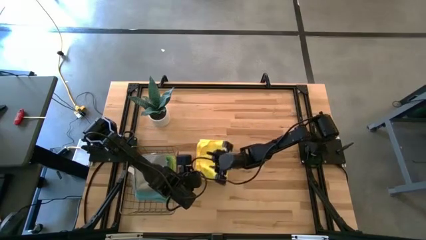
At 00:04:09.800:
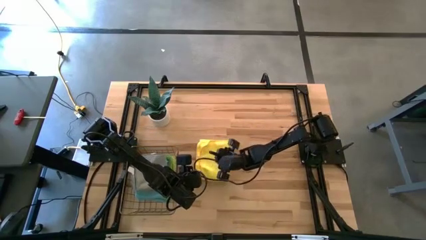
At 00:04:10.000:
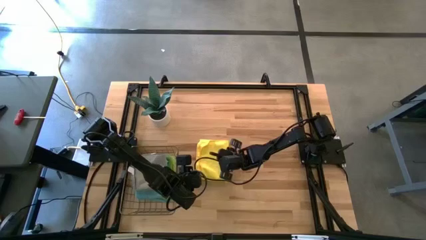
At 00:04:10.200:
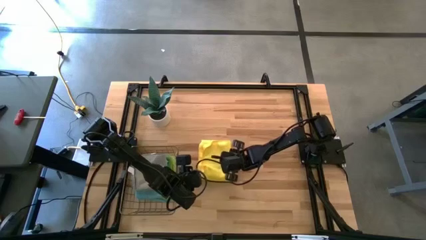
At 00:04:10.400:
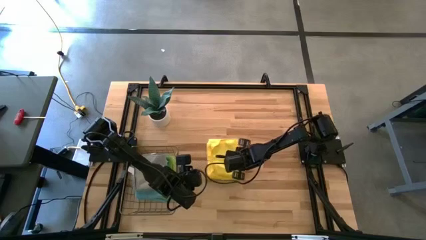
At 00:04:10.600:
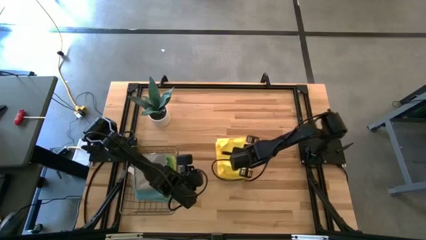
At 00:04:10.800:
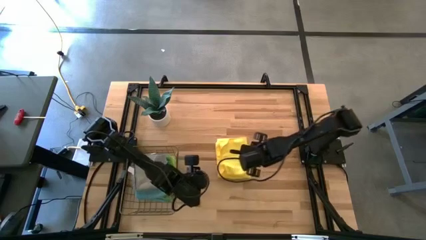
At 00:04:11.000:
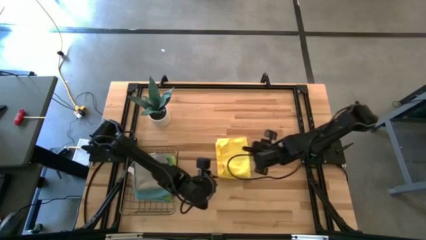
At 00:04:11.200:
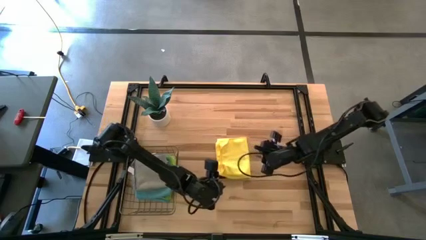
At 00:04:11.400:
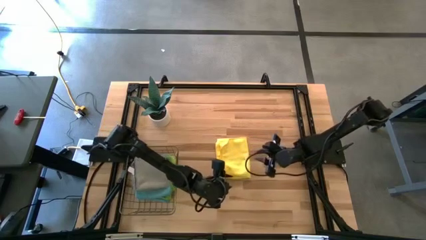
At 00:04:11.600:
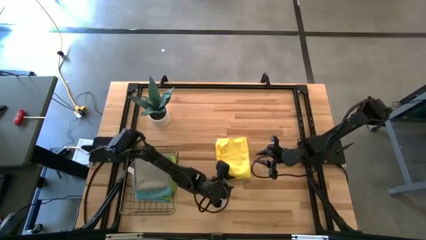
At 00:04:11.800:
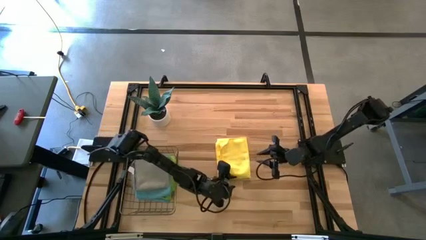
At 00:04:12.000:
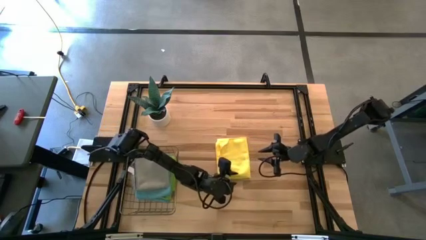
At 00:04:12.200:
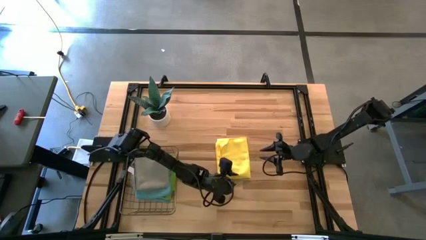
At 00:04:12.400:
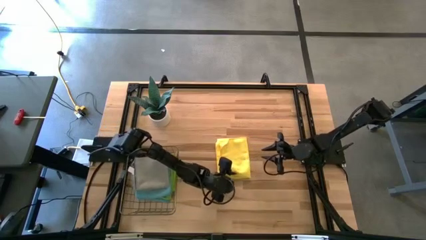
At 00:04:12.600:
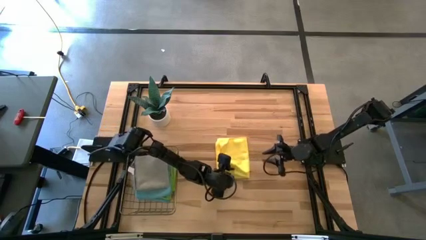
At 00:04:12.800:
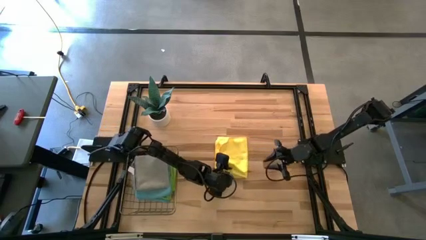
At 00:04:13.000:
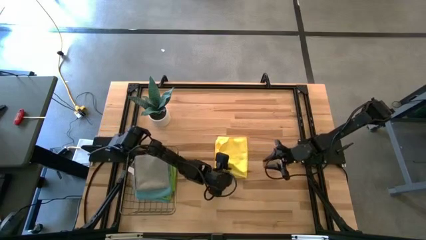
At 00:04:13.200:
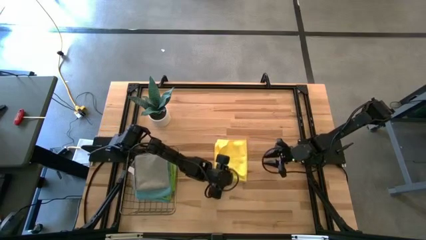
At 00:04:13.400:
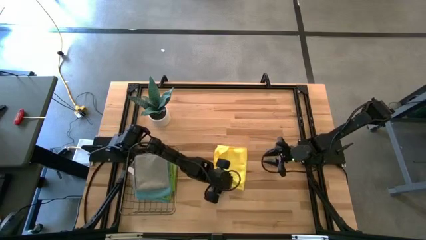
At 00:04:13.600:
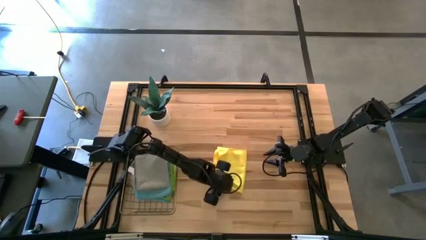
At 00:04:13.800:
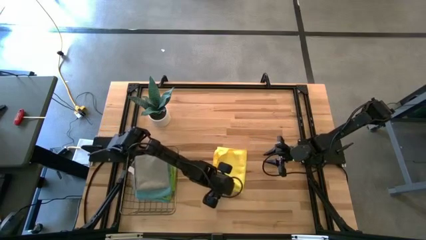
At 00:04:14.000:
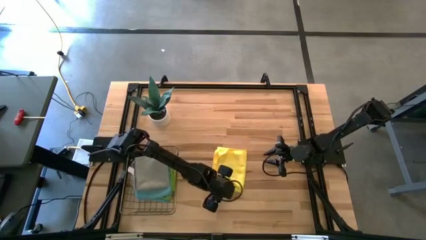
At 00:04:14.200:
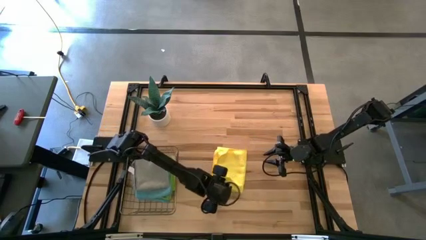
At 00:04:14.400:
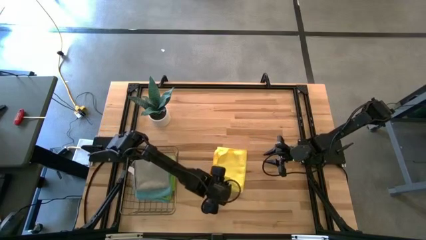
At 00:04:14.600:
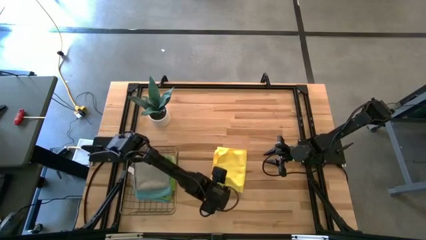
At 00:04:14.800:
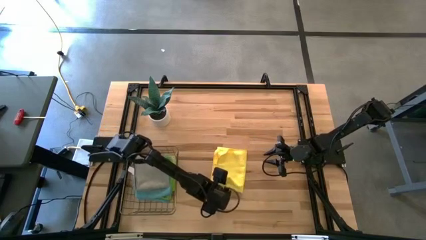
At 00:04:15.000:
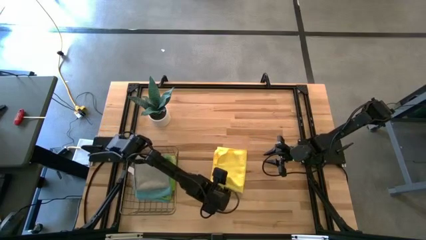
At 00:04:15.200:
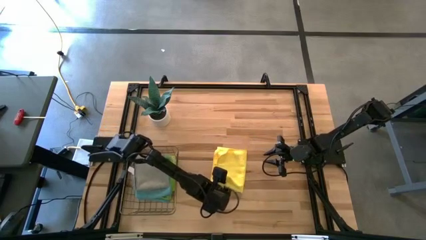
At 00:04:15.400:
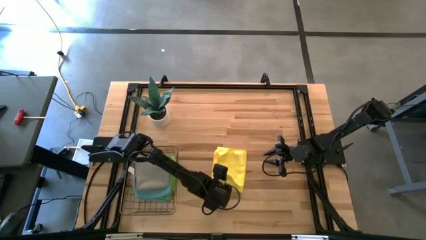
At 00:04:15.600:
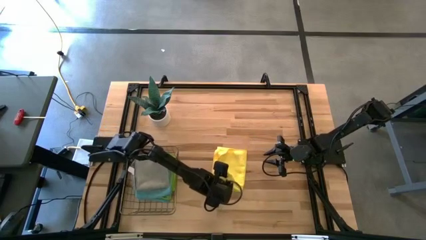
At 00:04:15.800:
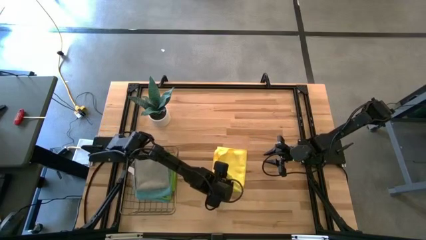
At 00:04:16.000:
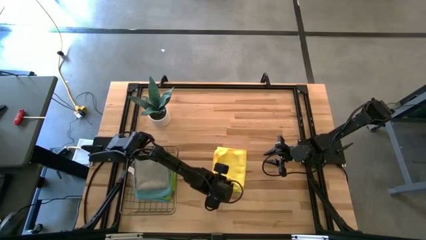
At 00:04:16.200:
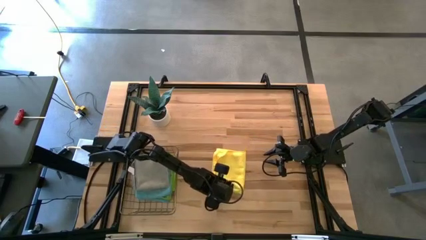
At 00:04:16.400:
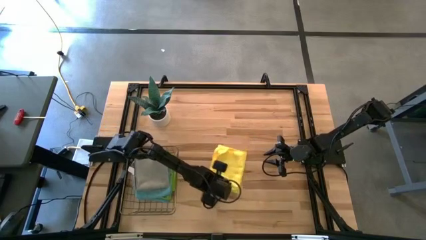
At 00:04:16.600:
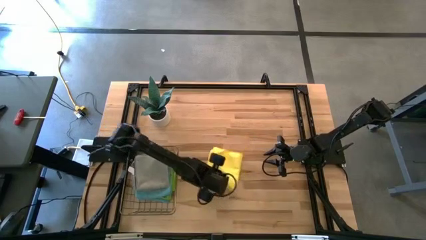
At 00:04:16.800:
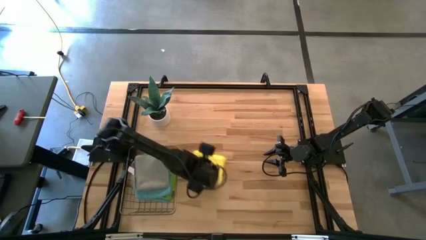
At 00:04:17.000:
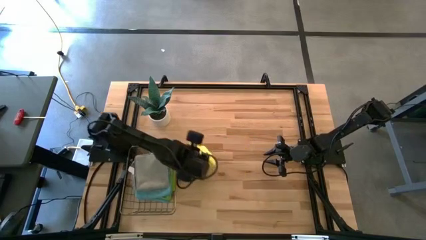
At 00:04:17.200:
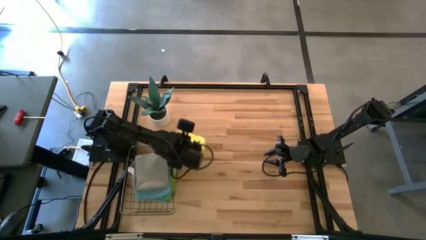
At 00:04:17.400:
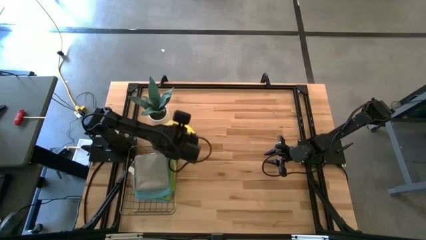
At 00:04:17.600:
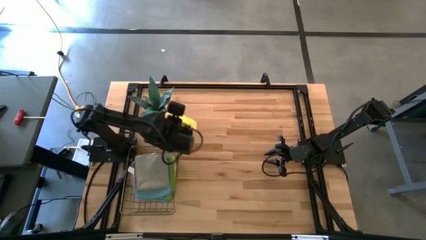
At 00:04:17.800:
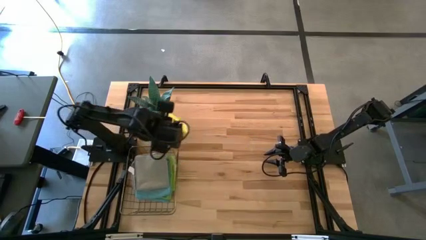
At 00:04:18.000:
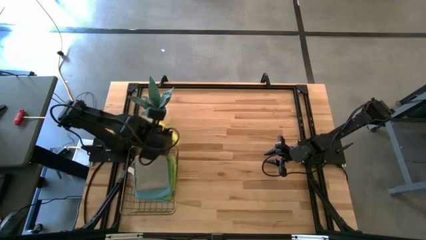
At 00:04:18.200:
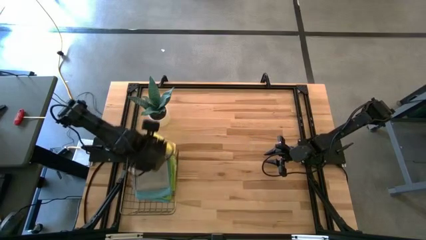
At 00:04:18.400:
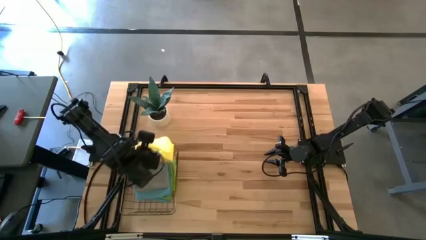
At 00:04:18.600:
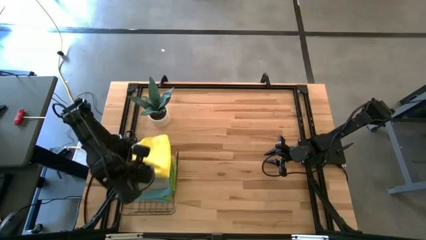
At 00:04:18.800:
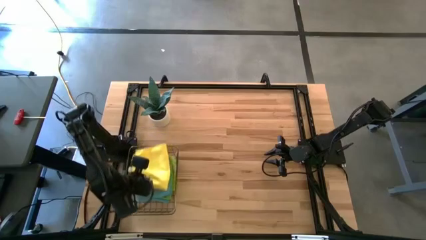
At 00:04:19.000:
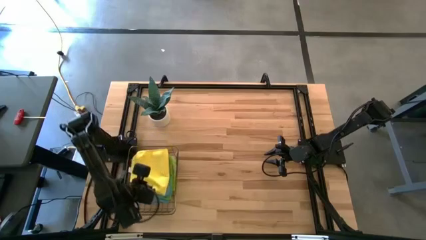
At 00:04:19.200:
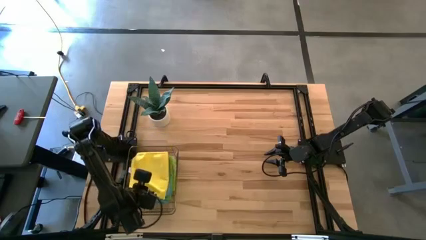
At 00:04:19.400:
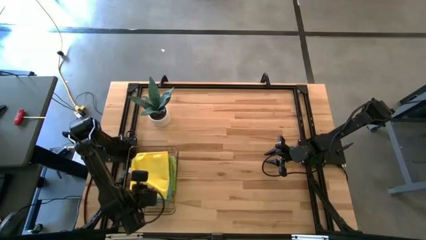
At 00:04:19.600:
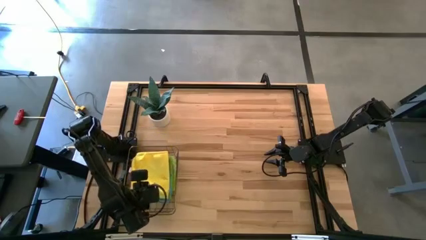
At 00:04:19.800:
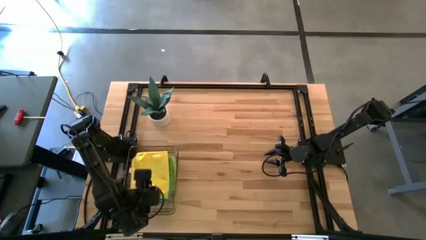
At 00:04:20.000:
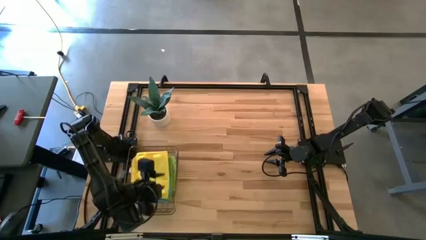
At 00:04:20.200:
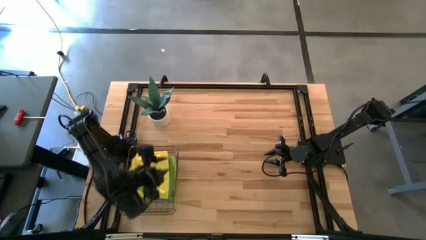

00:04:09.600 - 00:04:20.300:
Task: Fold microfiber towels
Put the yellow microfiber towel into the wire basket

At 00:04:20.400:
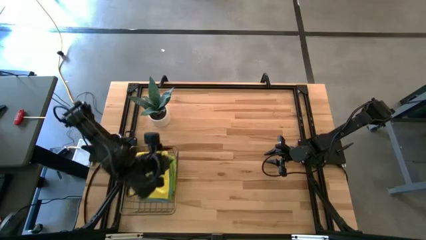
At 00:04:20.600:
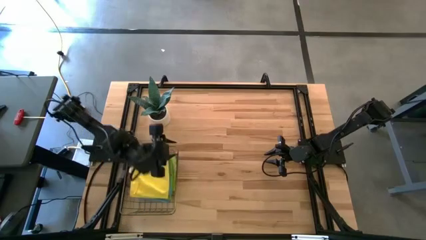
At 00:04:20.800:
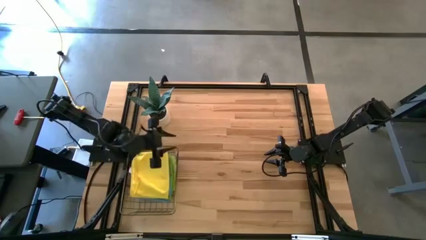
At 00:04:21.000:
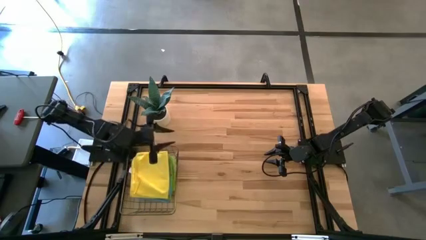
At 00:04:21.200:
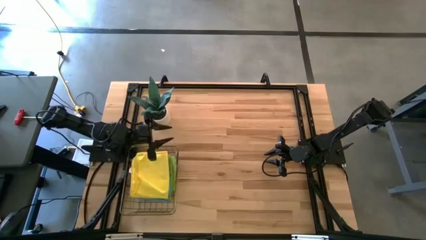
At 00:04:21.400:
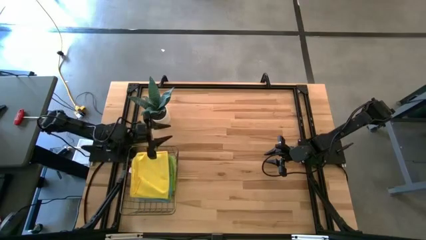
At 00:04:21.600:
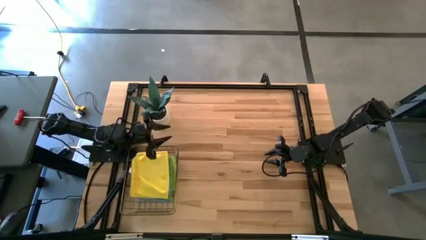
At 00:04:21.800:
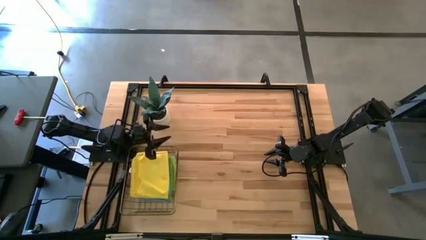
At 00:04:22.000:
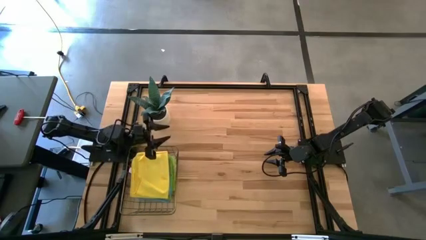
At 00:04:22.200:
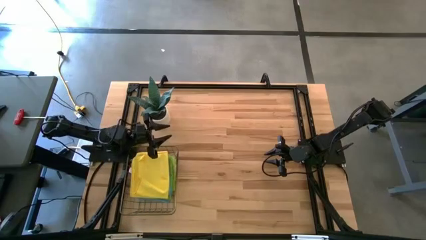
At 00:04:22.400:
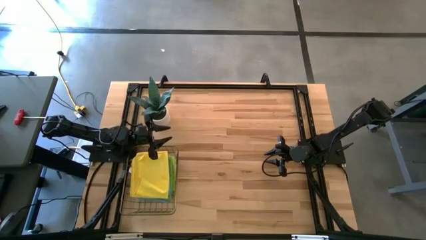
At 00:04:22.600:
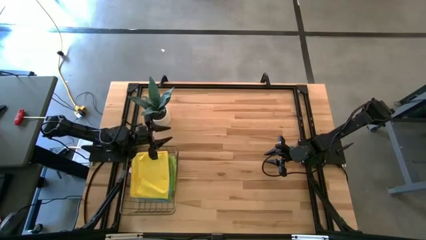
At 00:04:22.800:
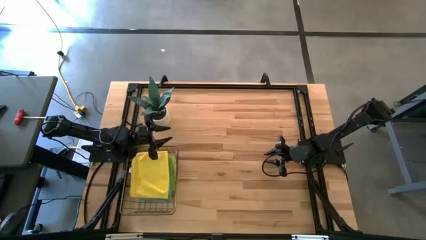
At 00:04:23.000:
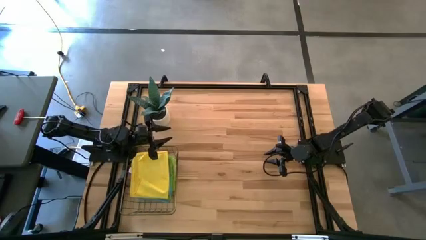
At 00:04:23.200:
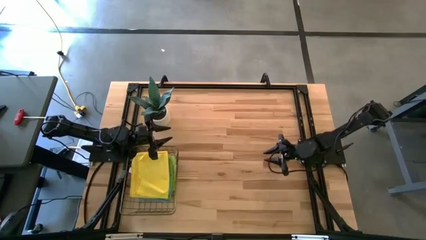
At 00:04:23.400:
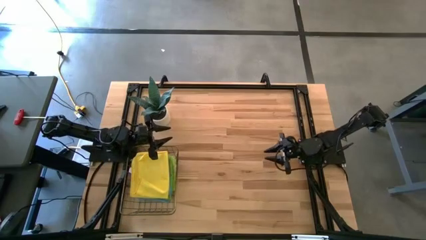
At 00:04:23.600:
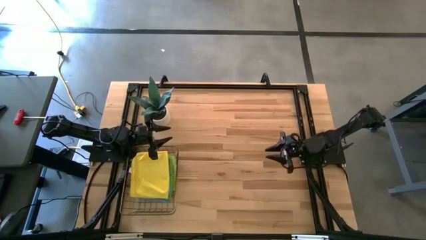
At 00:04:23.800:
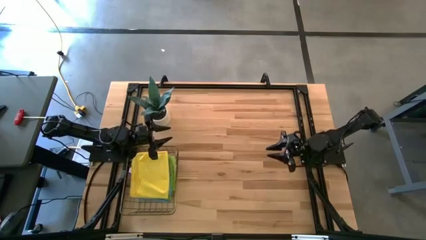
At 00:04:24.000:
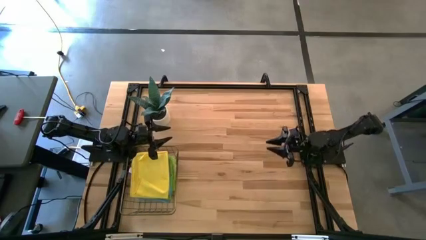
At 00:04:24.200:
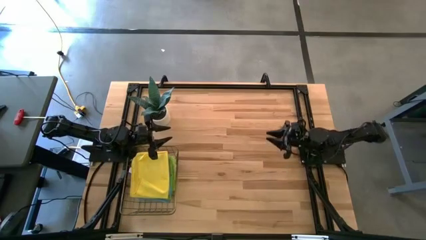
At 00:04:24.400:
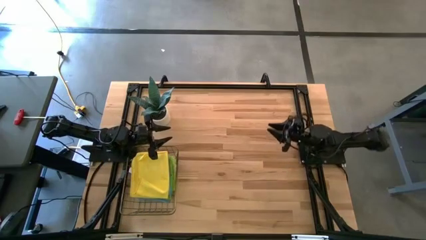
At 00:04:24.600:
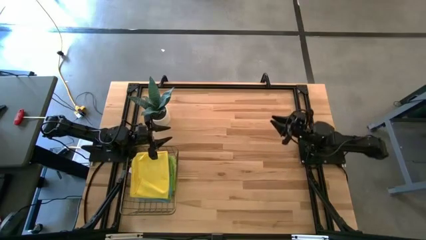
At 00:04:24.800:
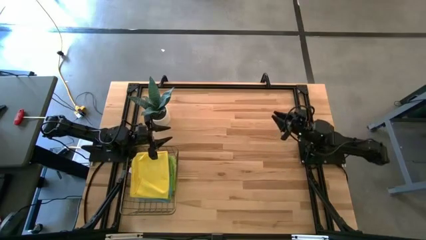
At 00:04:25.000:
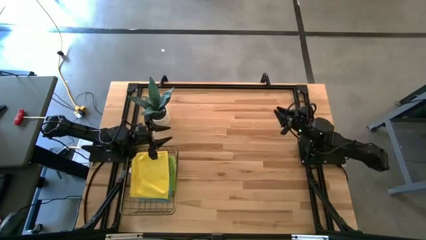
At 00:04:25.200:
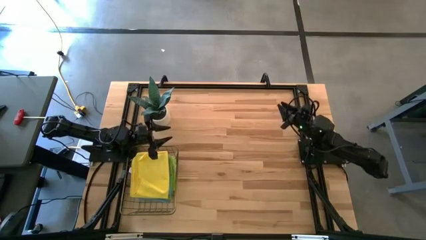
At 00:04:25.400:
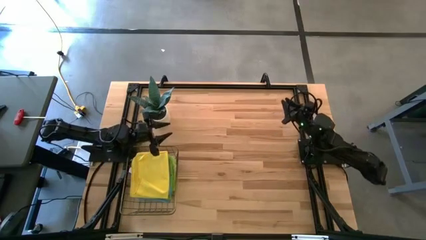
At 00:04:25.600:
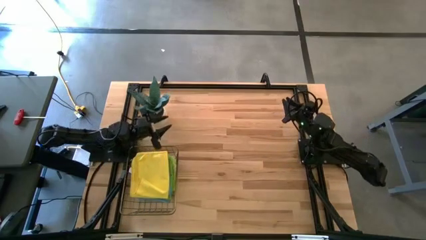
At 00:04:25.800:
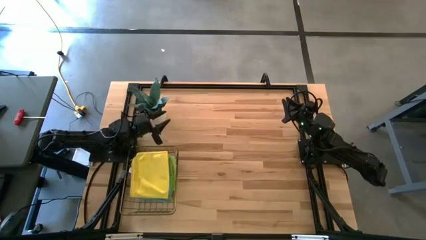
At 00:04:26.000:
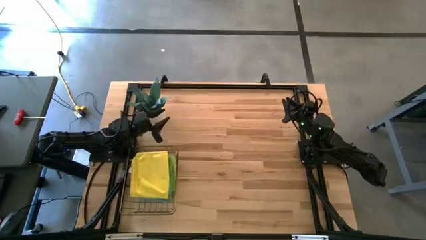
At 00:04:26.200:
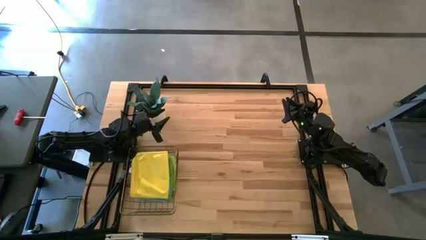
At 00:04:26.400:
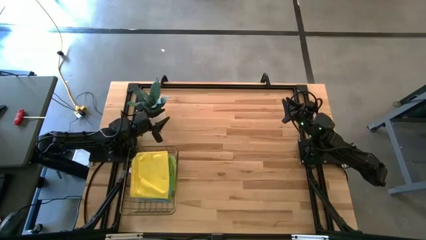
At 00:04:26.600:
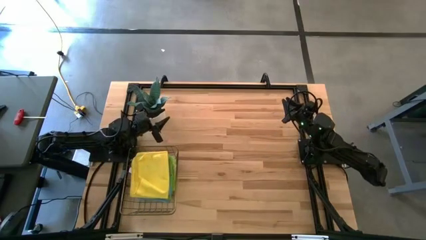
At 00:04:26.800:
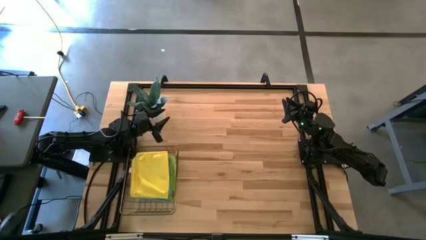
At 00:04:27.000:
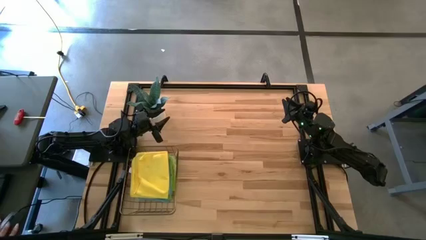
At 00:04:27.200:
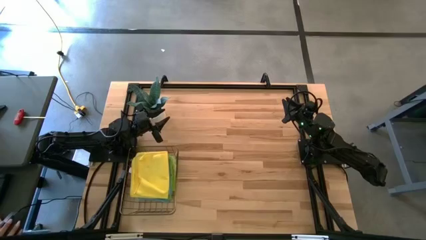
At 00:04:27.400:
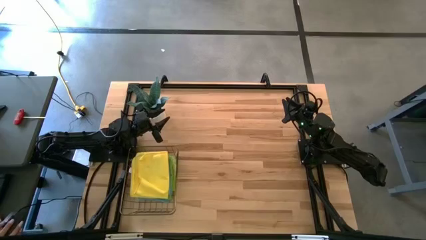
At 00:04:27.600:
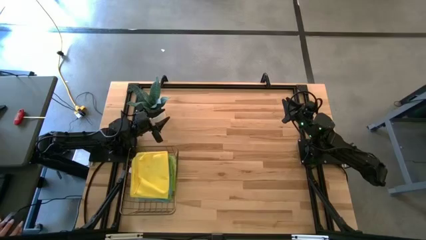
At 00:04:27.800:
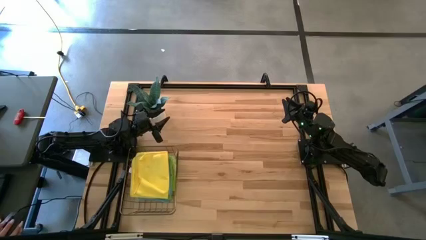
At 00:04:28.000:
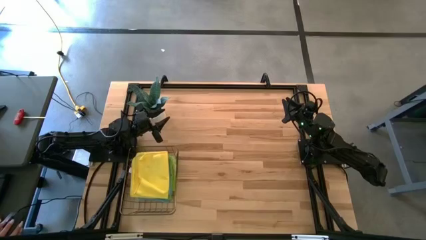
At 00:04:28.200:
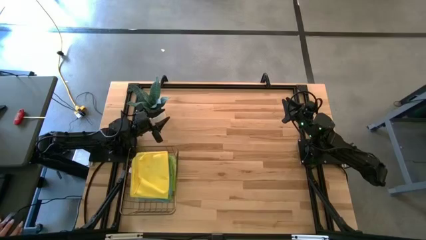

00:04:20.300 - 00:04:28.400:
Return to Home Position
